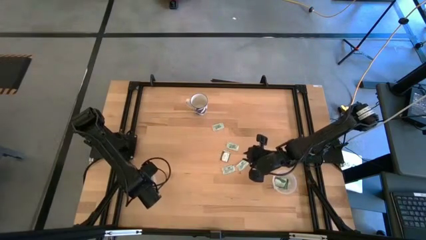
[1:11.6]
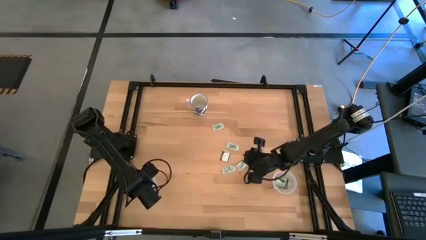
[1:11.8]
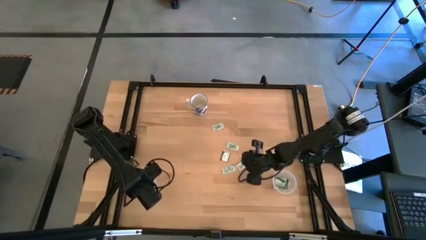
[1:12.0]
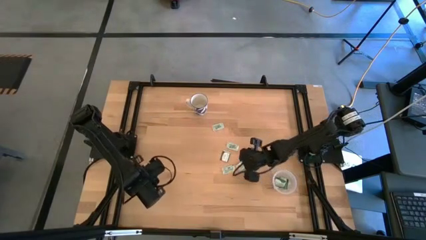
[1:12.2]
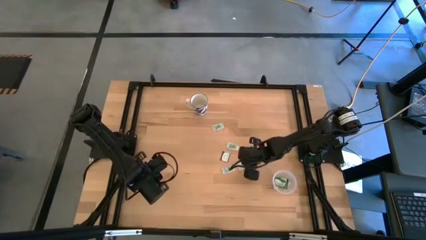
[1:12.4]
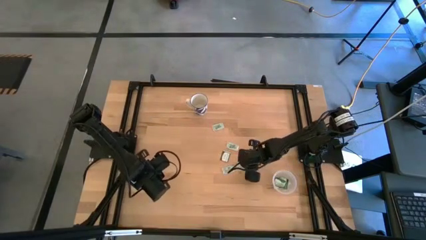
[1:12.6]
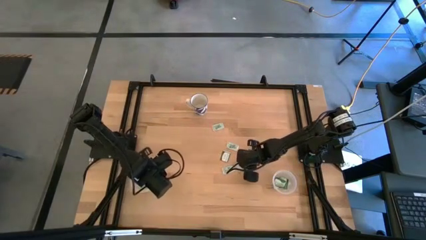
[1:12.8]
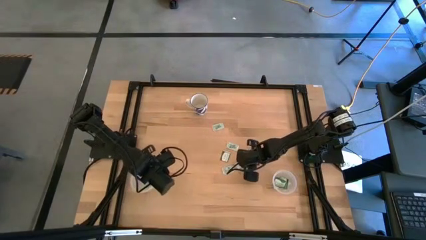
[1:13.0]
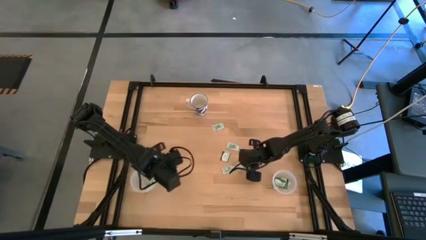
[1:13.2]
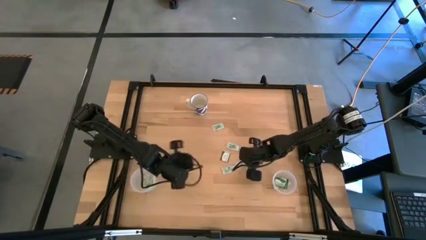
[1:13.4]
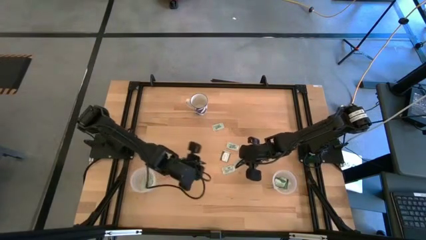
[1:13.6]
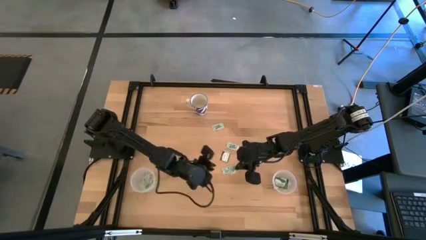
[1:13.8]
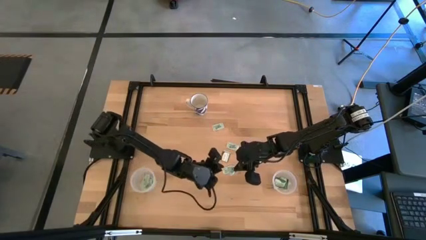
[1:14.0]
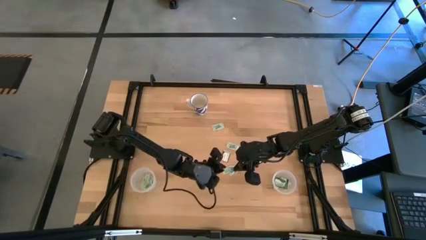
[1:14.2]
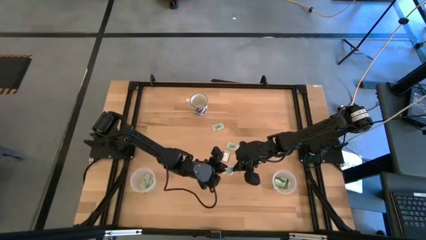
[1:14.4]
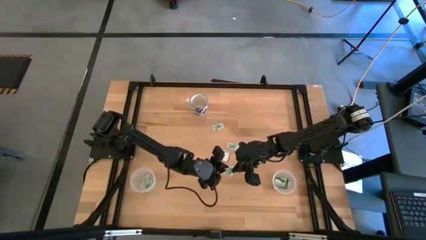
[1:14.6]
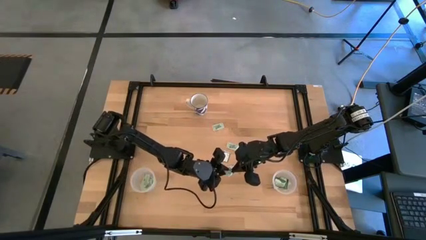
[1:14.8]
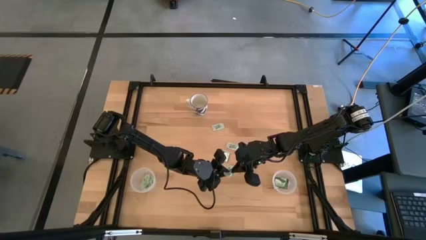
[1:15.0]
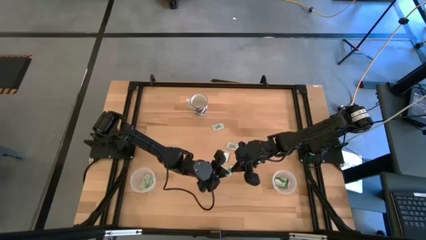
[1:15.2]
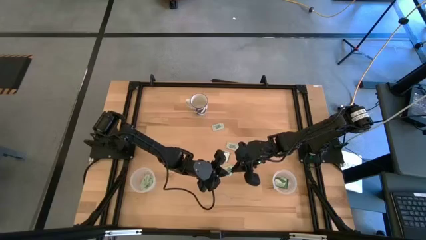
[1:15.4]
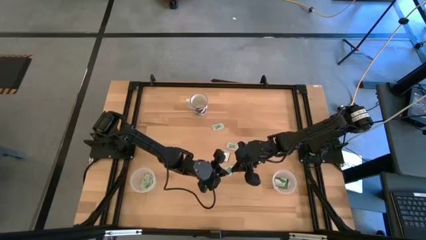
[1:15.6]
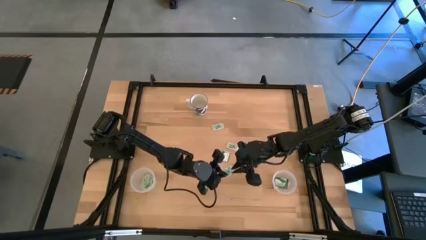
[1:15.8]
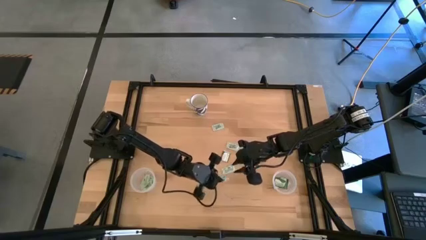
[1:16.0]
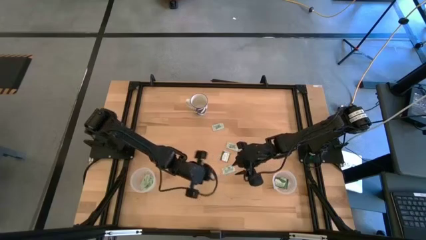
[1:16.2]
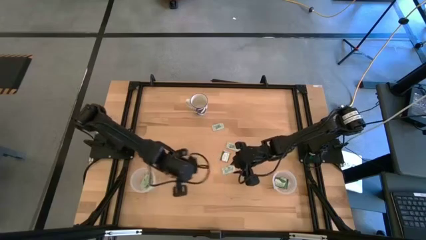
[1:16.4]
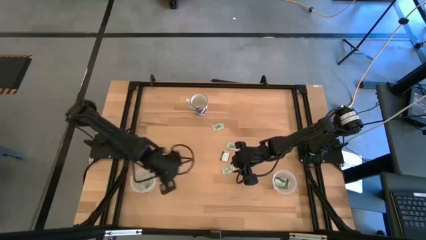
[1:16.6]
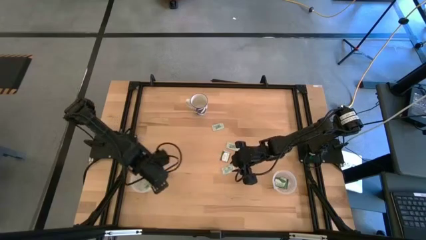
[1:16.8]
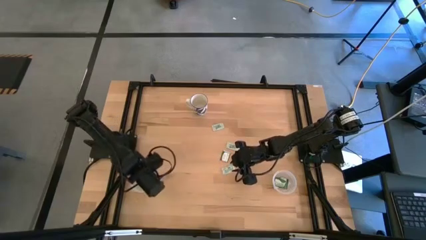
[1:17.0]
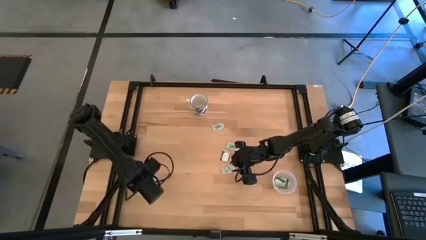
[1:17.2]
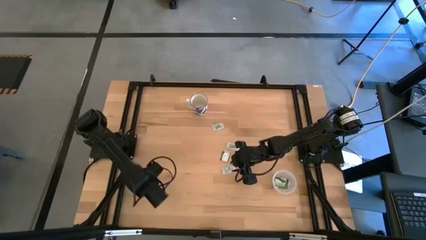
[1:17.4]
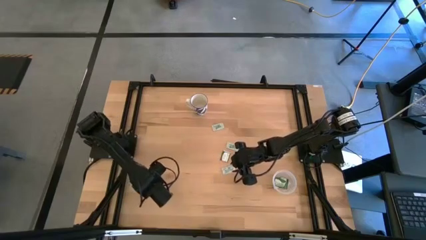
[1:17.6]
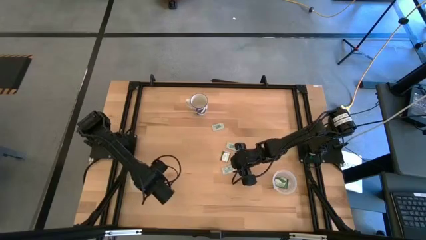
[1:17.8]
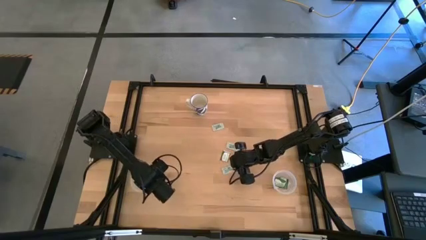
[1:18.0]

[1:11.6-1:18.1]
Task: Pick and place Stevia / Truvia into bins
Put the light green stevia packet into the left transparent container

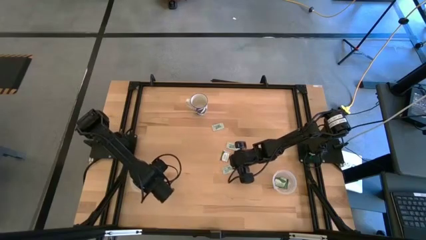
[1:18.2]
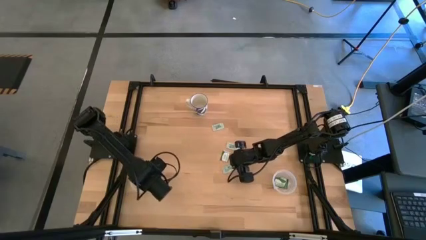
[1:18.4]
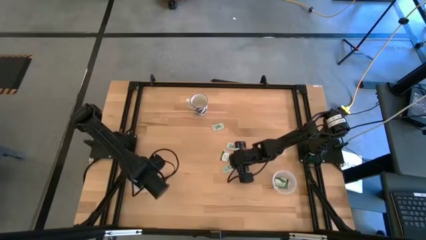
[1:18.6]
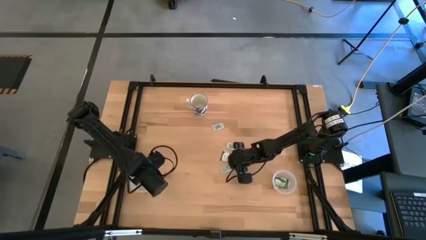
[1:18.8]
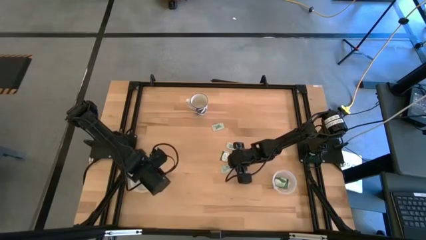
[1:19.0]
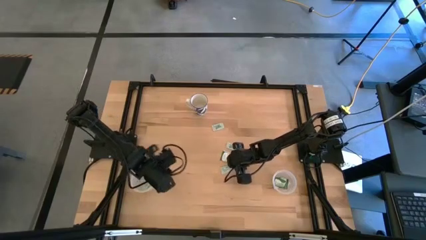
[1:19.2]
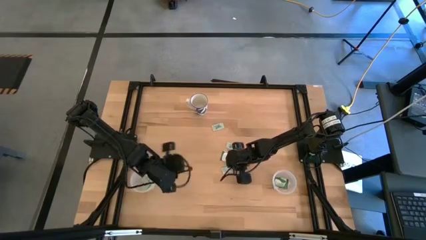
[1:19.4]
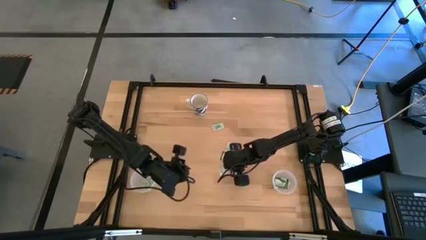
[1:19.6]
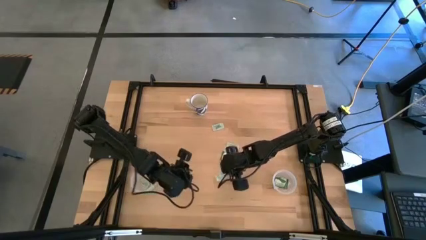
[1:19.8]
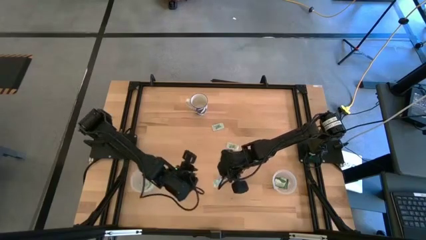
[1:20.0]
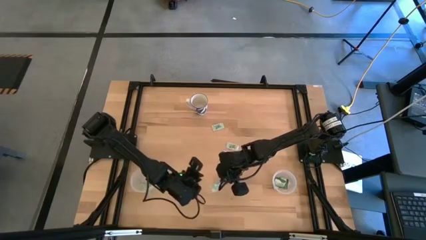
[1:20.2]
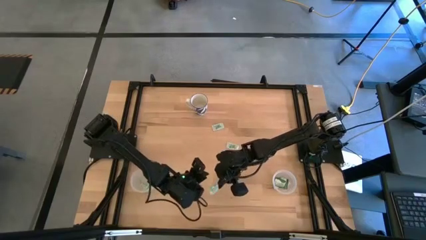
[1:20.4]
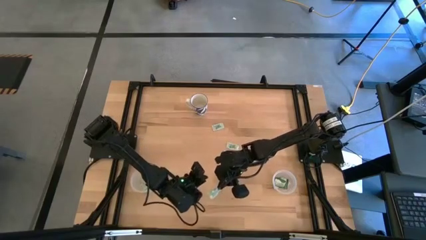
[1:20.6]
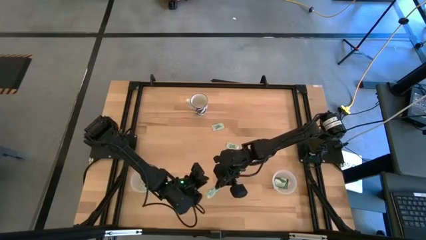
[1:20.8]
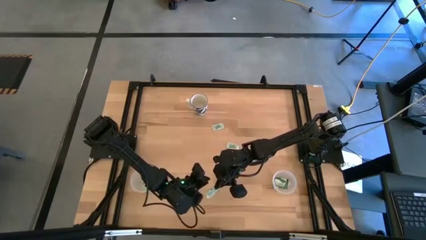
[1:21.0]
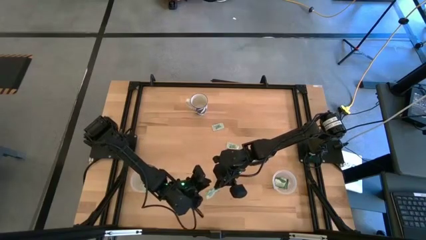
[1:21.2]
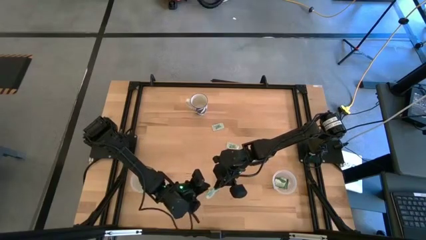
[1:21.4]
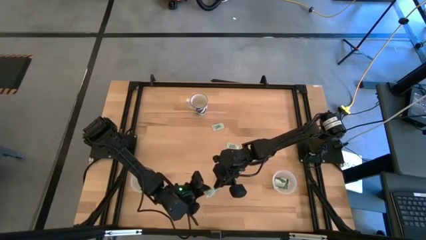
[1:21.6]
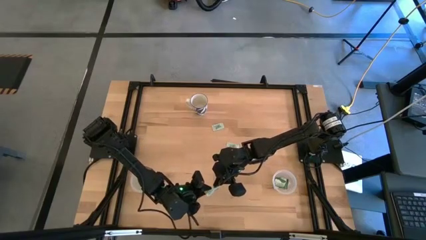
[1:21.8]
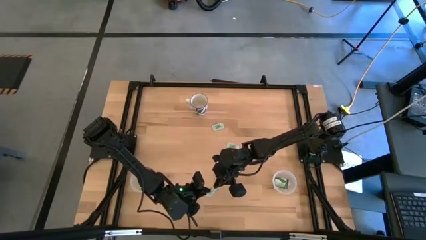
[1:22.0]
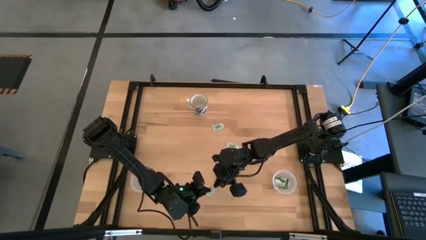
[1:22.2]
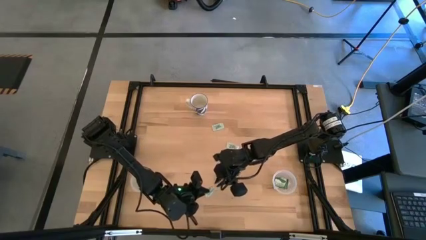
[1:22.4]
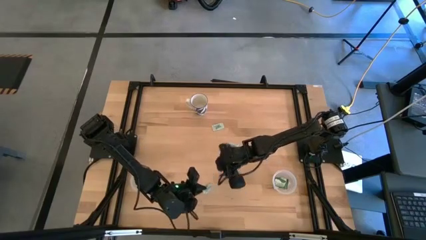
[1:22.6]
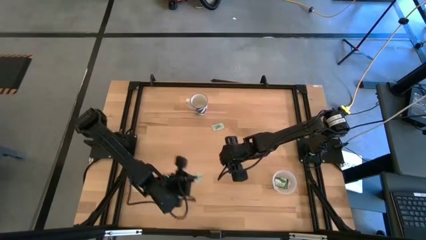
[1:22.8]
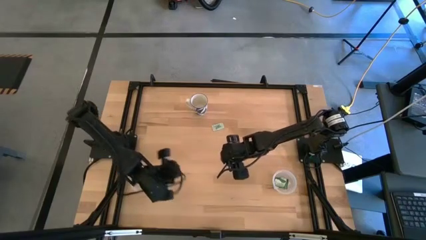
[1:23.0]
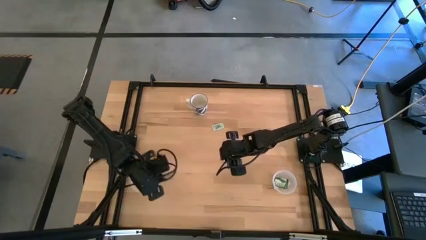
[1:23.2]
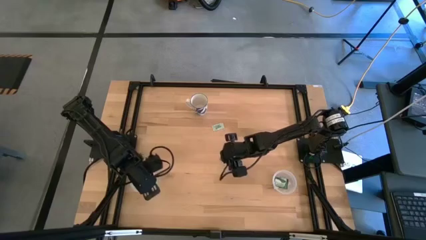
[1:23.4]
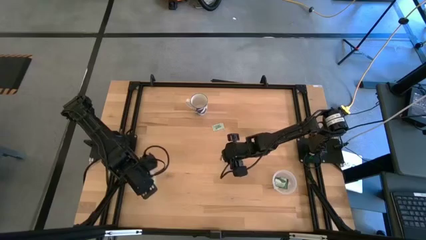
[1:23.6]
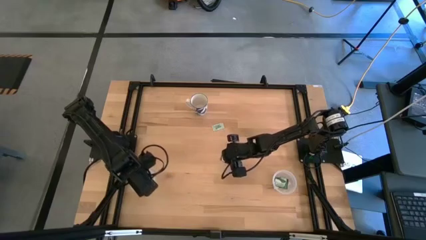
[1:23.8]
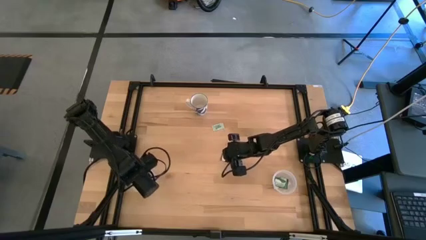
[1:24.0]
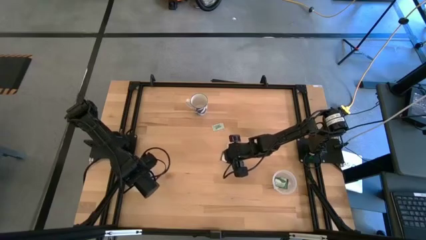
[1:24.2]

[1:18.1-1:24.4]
Put the light green stevia packet into the left transparent container

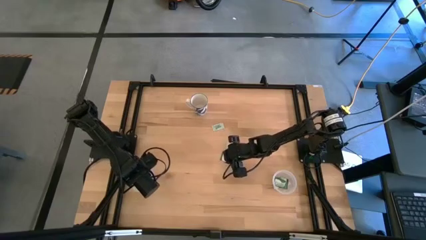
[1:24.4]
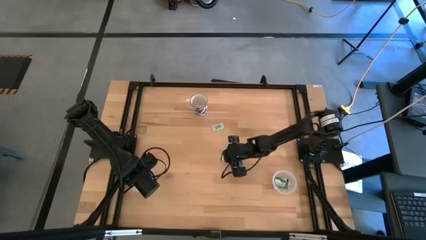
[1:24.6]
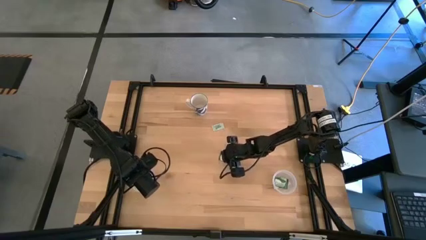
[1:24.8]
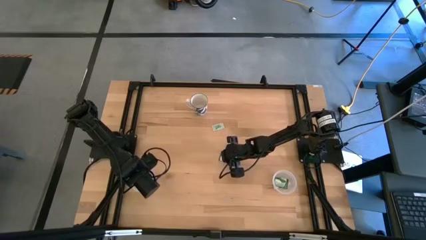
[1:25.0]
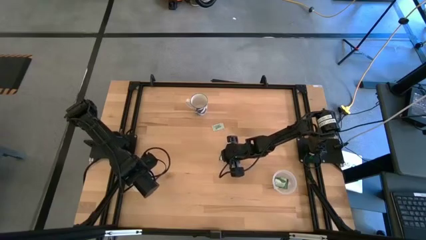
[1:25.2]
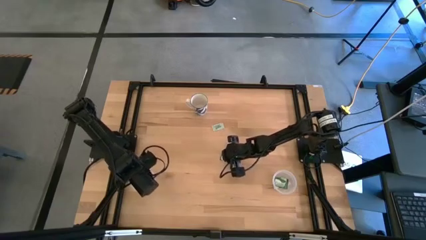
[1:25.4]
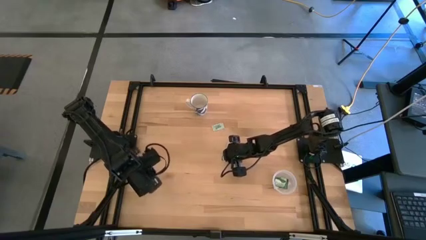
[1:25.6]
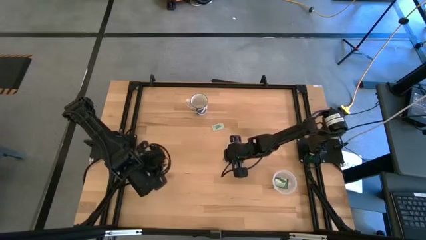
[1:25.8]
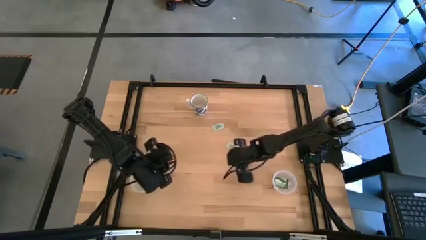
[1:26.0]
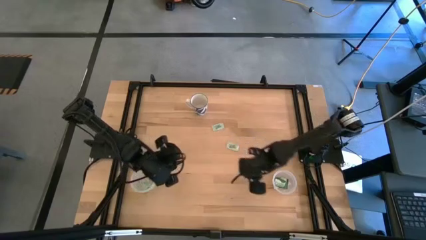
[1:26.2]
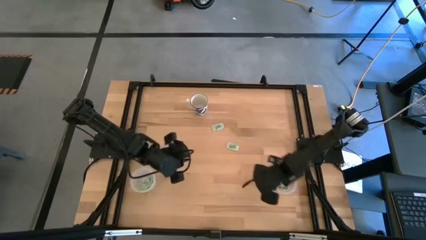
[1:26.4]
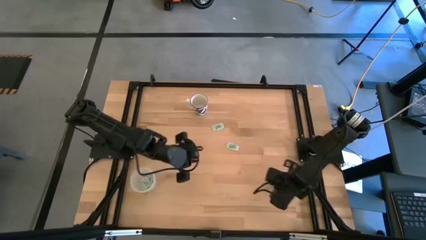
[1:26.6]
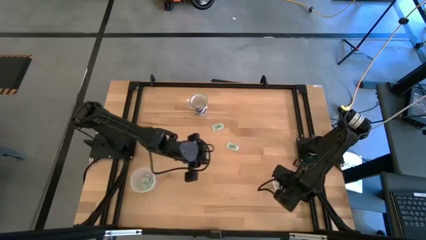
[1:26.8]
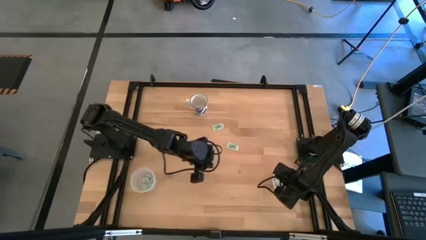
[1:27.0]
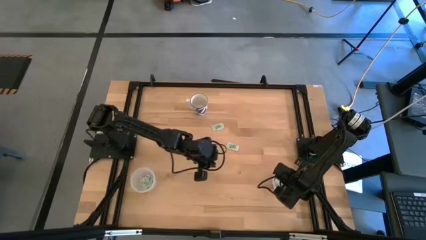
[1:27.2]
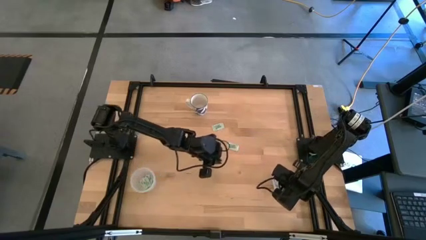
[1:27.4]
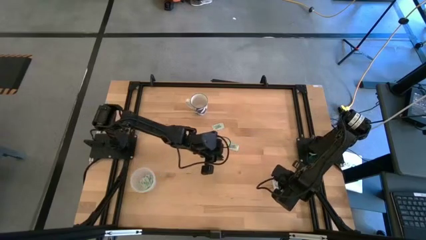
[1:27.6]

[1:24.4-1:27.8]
Put the green stevia packet into the right transparent container
